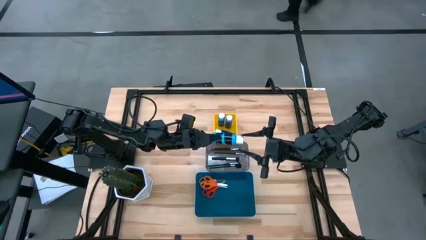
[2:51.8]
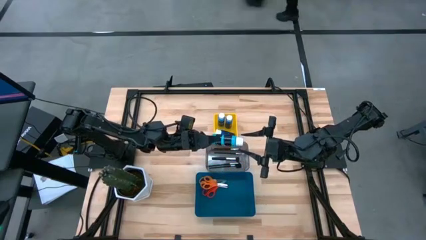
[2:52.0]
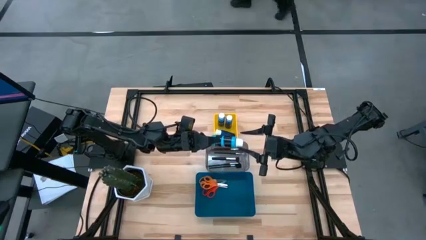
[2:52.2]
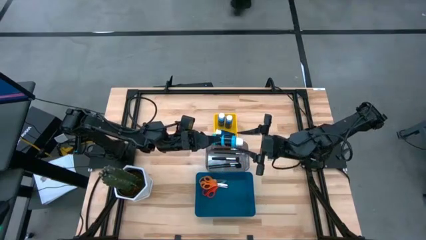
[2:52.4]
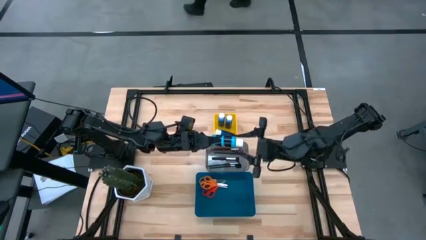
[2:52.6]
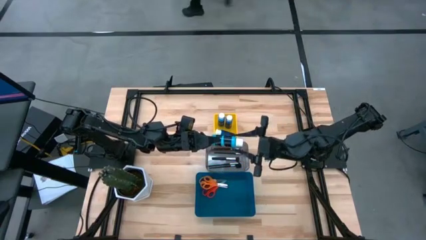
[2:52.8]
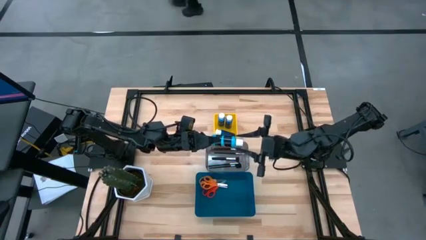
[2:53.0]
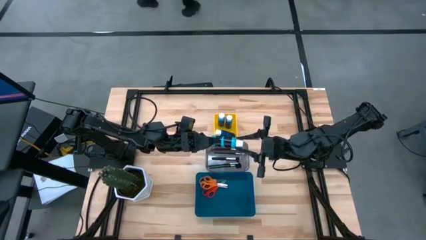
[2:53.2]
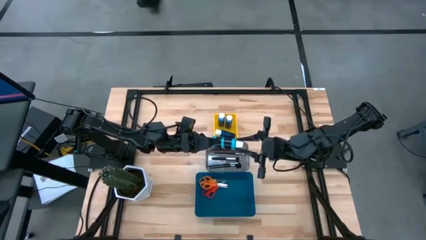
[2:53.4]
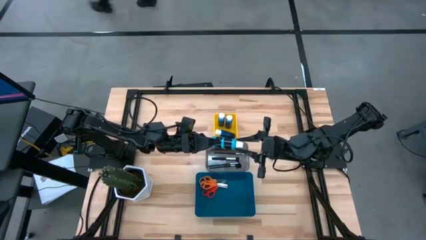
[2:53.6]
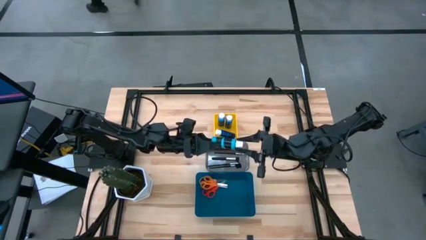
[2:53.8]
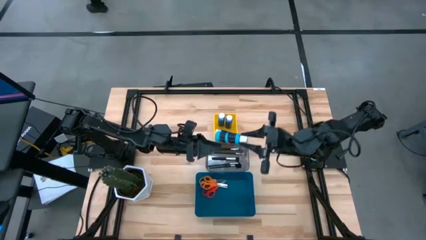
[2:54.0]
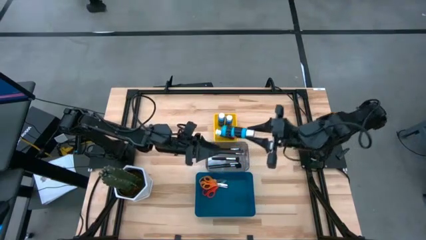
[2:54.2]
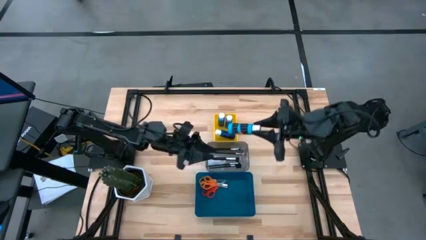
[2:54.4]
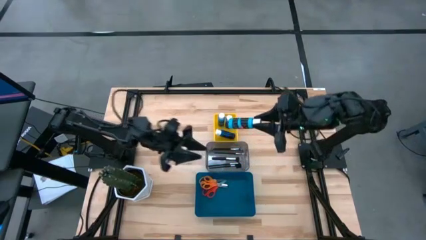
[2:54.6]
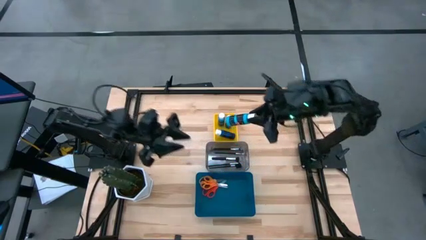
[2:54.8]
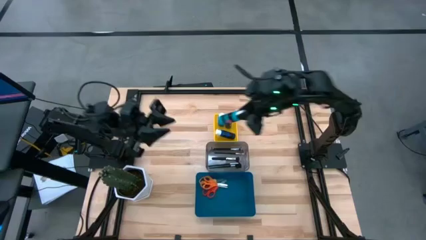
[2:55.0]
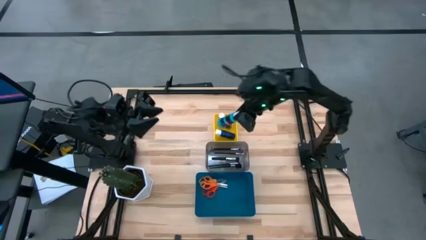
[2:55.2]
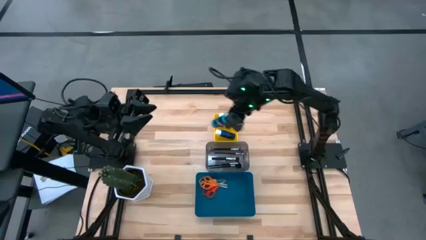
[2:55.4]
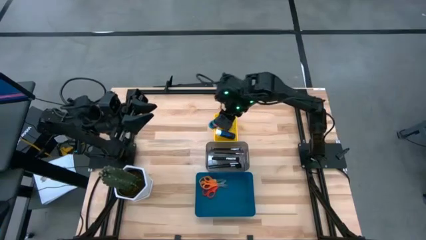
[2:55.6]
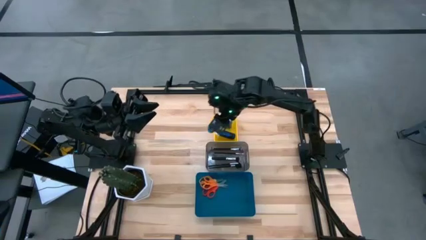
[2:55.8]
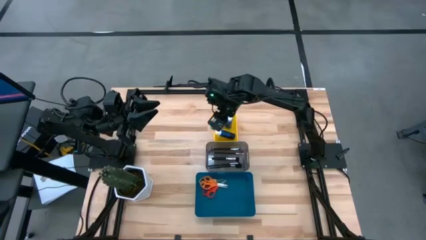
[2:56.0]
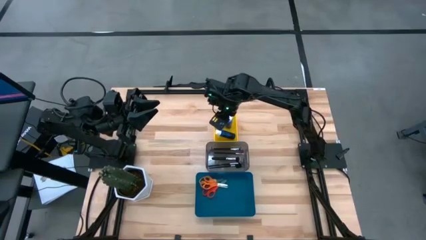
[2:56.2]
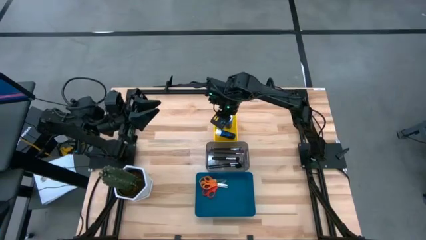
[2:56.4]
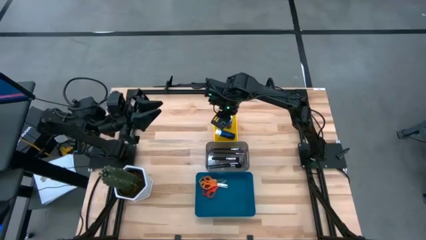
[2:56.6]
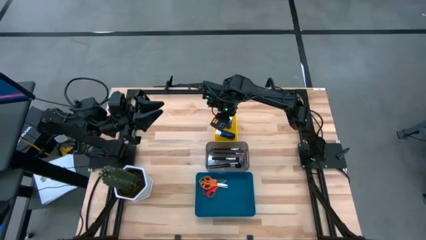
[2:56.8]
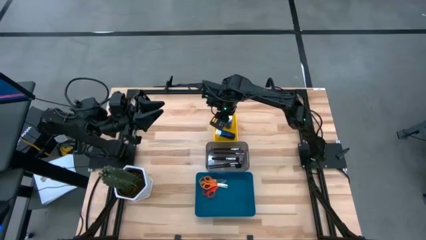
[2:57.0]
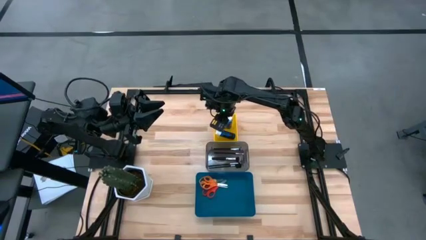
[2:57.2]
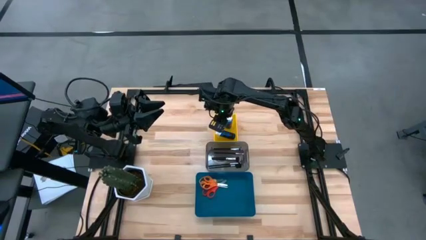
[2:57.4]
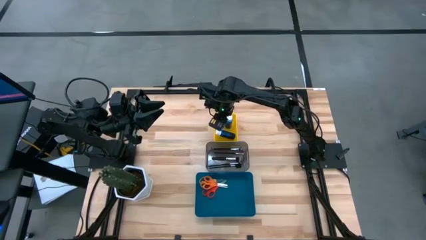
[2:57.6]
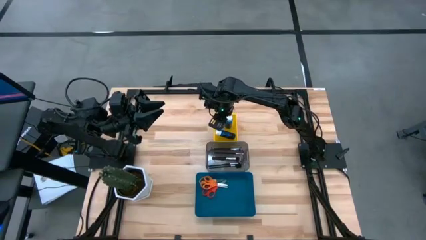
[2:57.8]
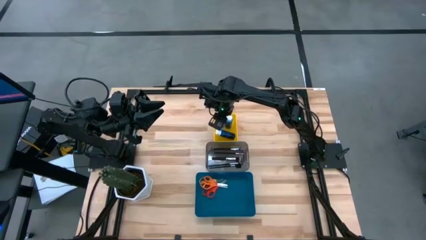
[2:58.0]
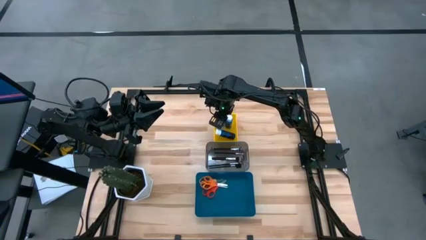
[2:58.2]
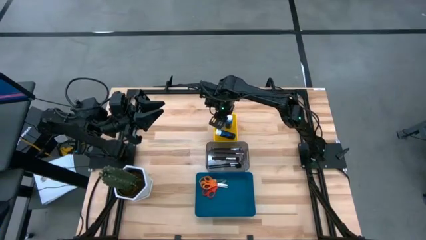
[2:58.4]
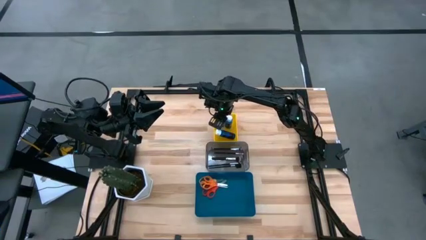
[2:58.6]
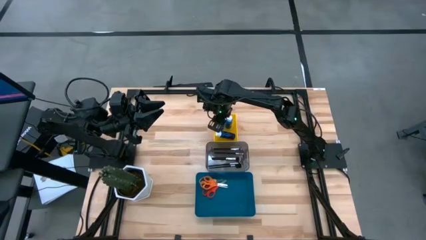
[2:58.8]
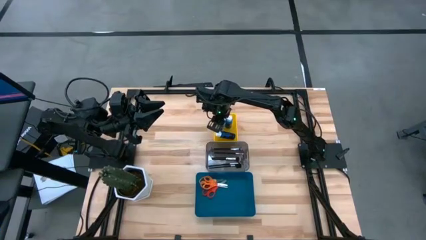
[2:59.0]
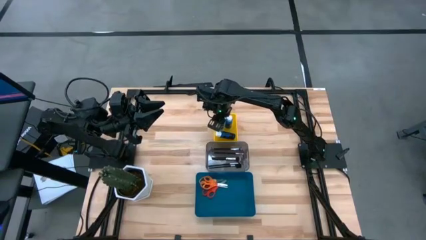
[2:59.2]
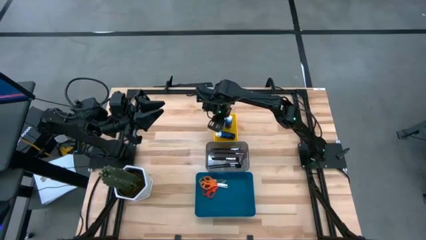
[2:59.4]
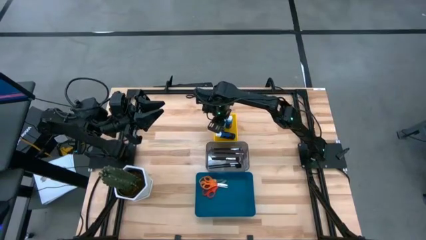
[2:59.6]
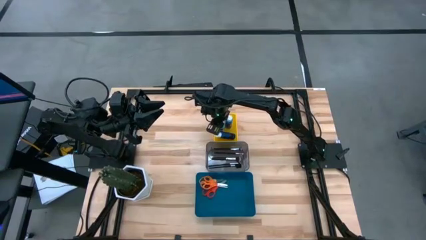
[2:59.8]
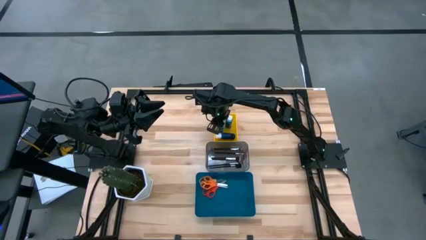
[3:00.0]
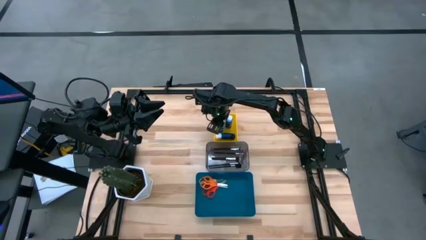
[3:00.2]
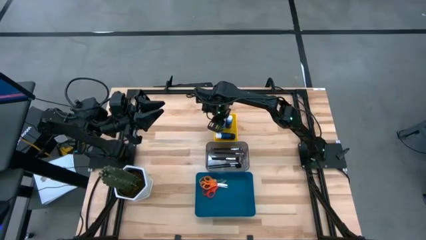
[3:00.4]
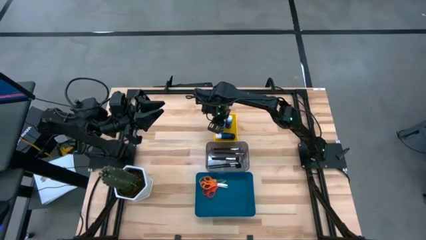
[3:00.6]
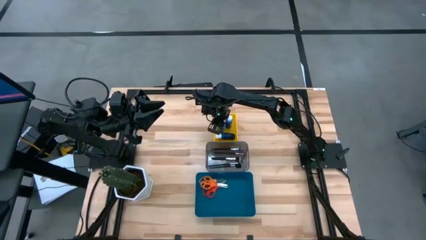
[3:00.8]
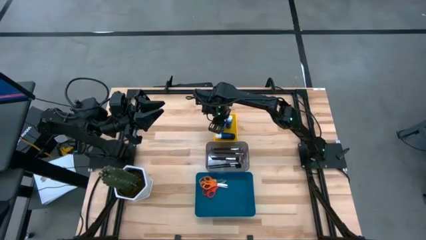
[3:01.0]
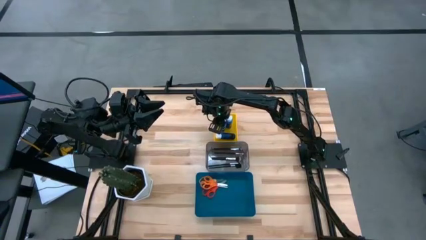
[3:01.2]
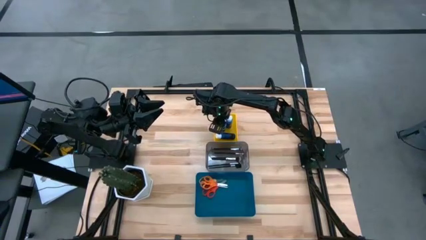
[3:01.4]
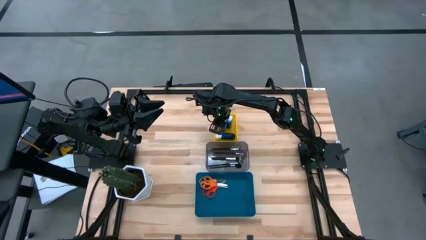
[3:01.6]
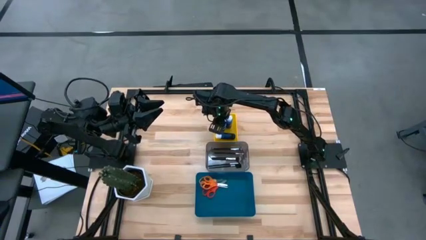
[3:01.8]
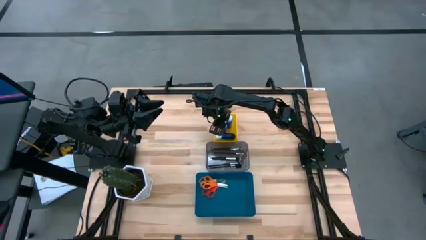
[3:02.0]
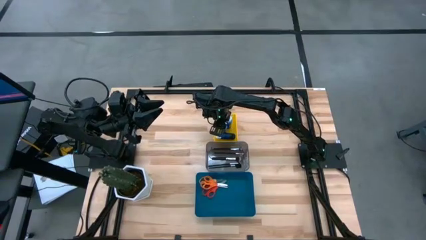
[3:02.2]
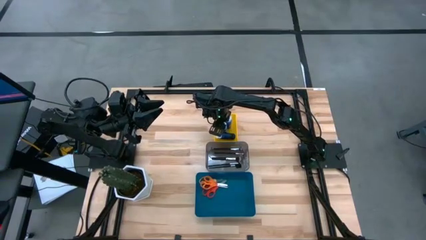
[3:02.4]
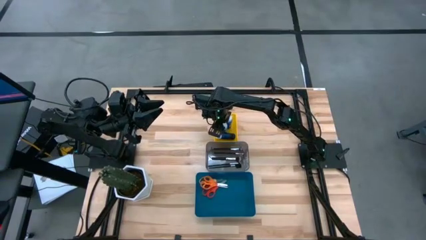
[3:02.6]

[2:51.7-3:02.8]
Task: Pick & Place Paint Supplies
Put the blue paint bottle into the yellow bin
